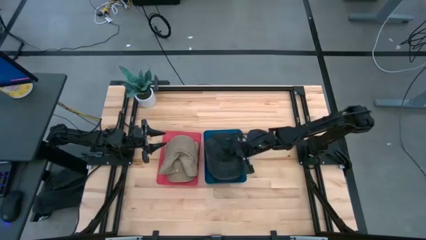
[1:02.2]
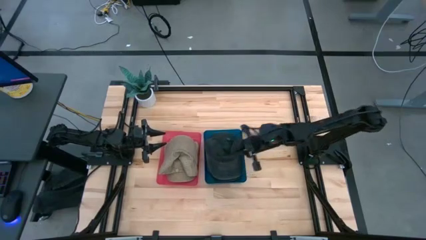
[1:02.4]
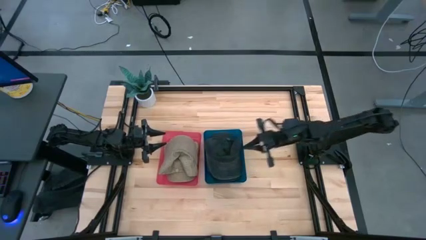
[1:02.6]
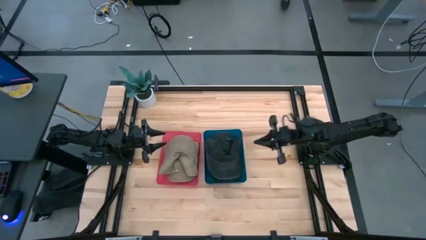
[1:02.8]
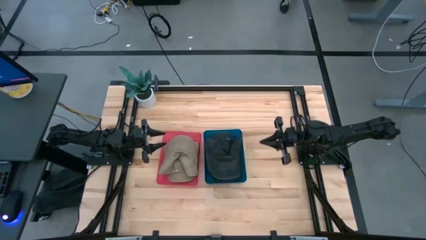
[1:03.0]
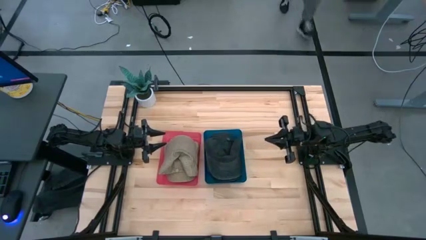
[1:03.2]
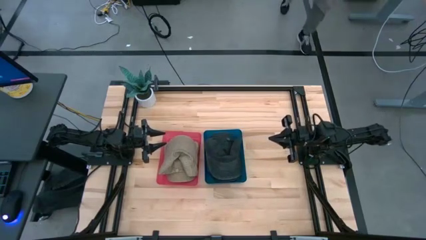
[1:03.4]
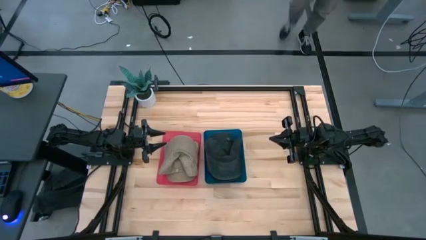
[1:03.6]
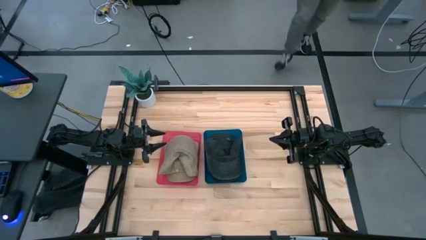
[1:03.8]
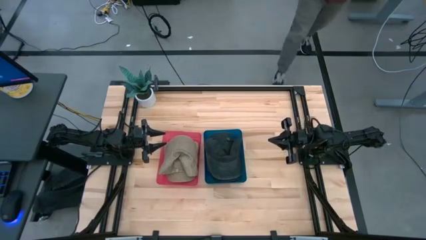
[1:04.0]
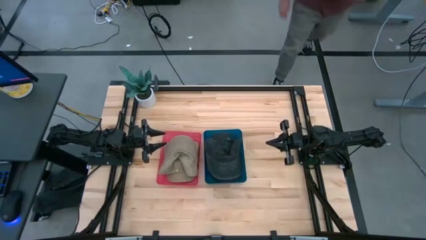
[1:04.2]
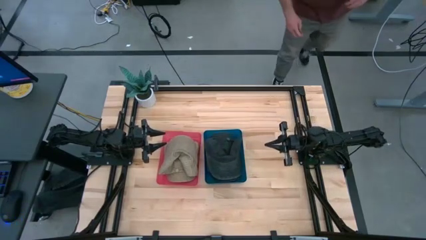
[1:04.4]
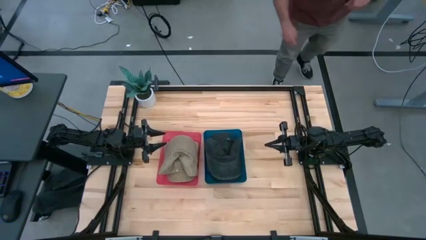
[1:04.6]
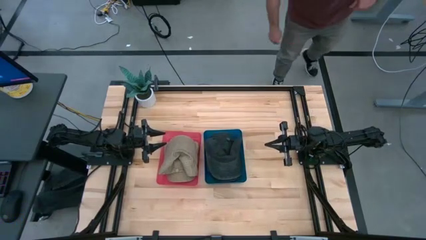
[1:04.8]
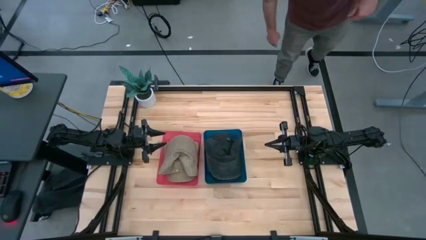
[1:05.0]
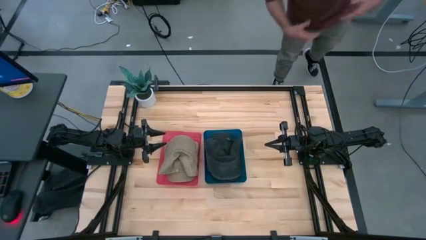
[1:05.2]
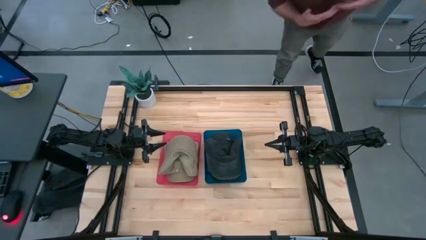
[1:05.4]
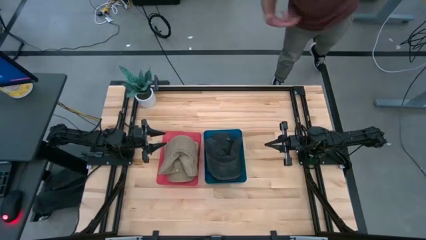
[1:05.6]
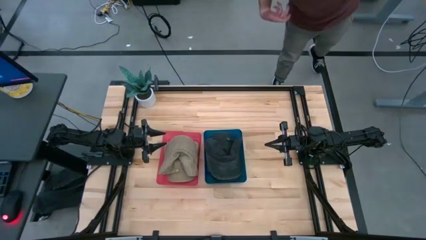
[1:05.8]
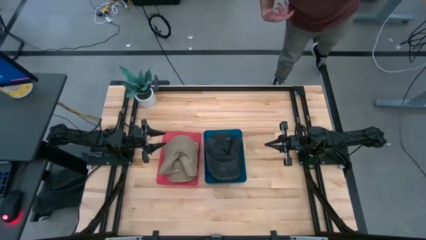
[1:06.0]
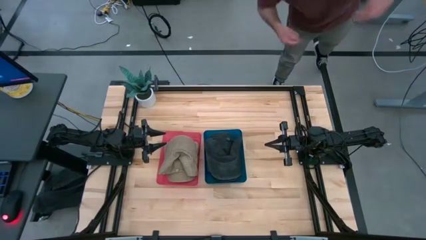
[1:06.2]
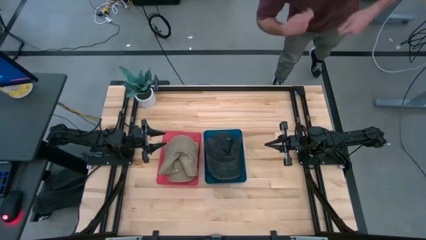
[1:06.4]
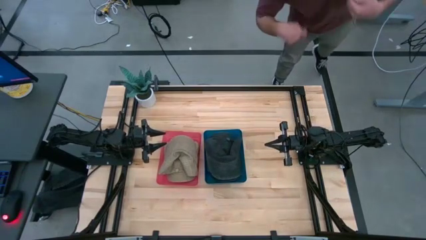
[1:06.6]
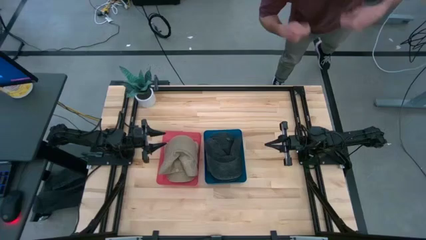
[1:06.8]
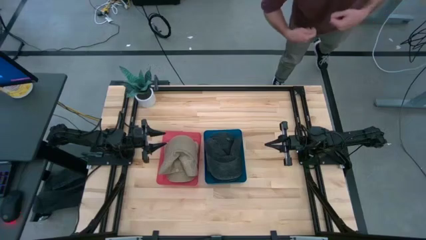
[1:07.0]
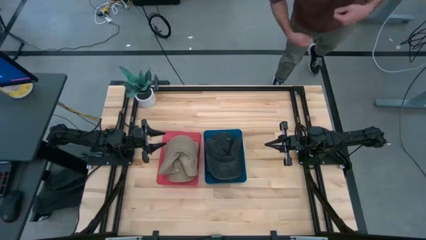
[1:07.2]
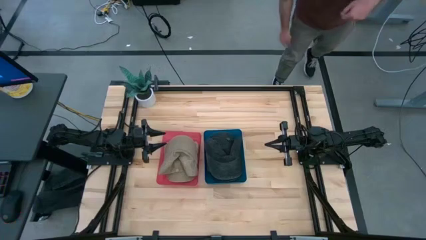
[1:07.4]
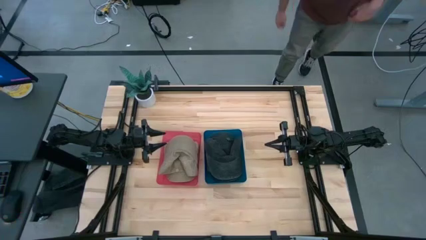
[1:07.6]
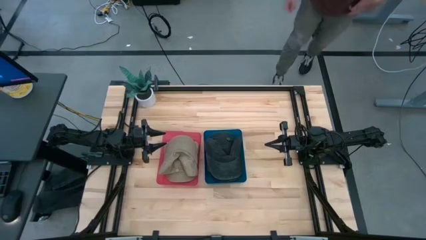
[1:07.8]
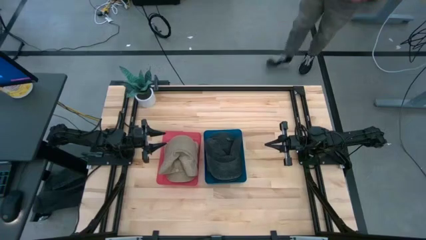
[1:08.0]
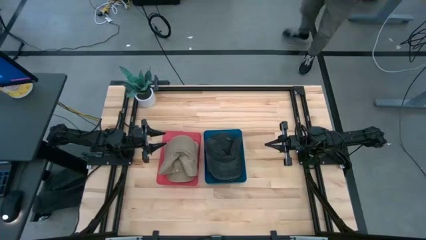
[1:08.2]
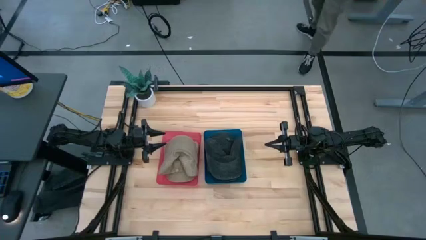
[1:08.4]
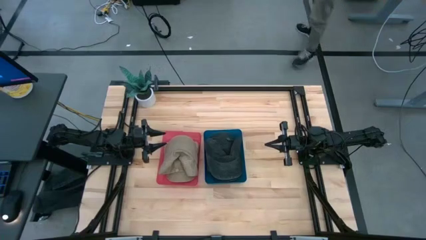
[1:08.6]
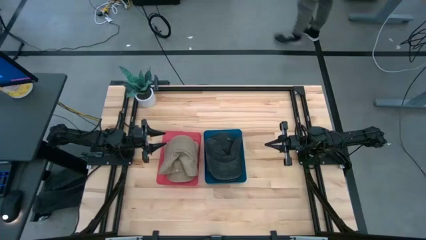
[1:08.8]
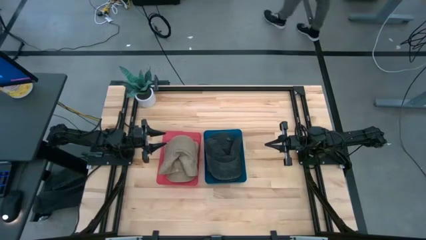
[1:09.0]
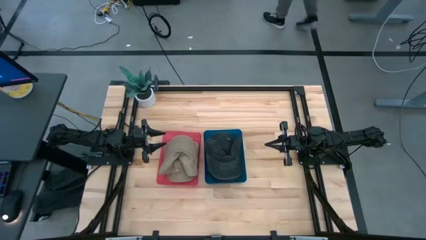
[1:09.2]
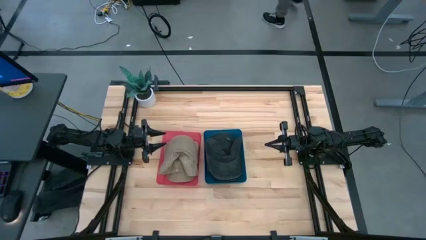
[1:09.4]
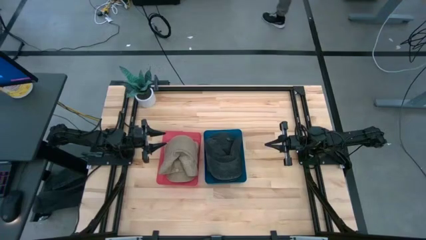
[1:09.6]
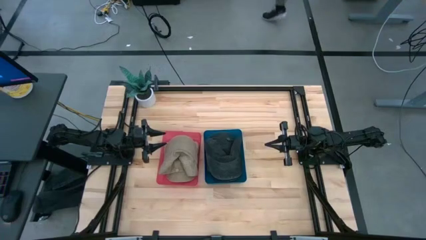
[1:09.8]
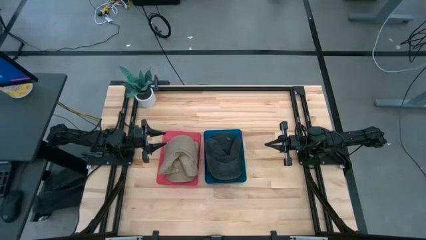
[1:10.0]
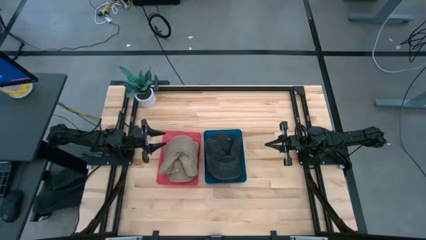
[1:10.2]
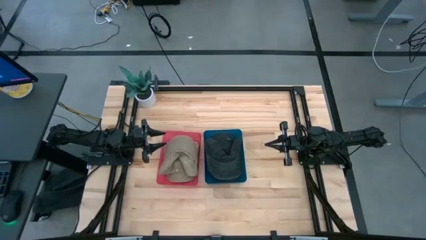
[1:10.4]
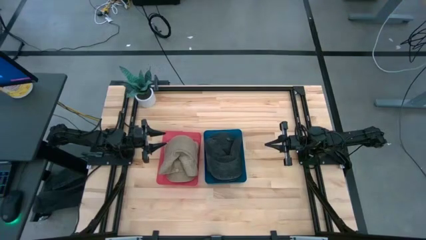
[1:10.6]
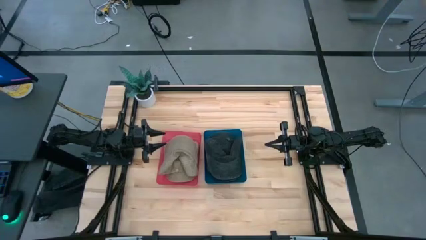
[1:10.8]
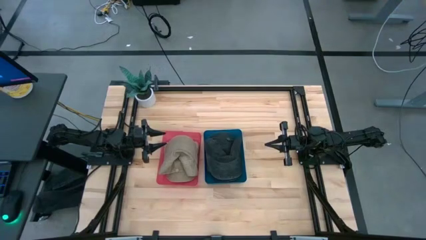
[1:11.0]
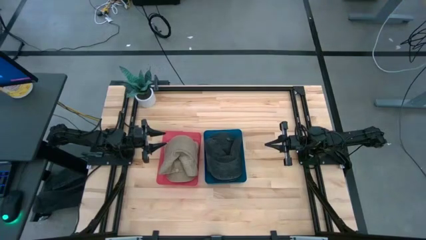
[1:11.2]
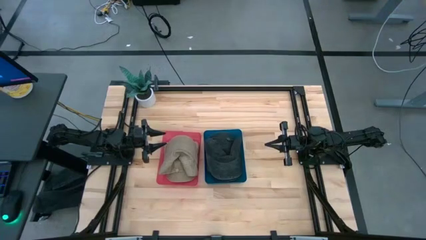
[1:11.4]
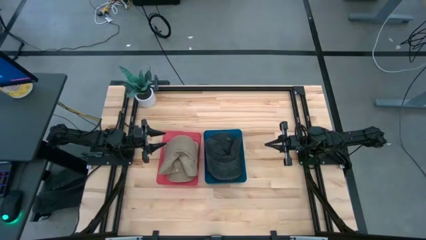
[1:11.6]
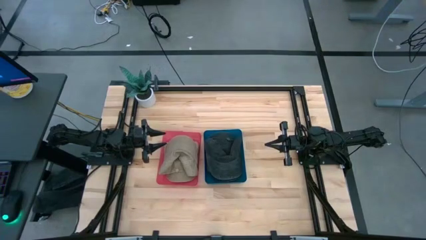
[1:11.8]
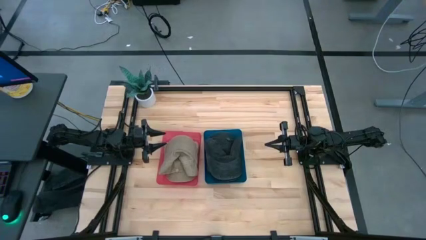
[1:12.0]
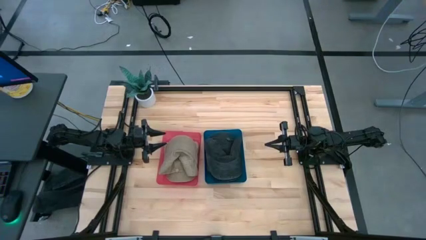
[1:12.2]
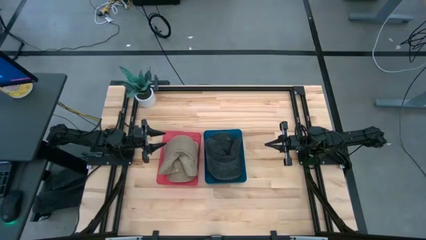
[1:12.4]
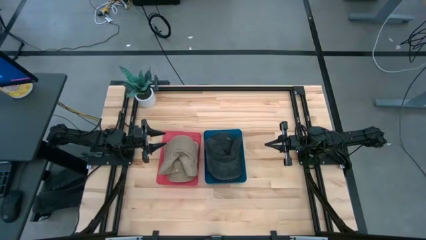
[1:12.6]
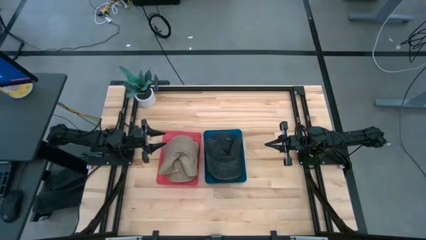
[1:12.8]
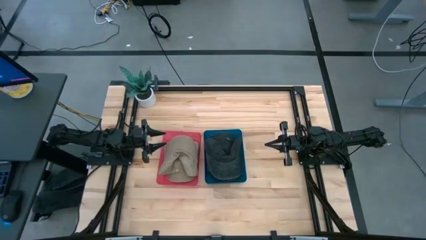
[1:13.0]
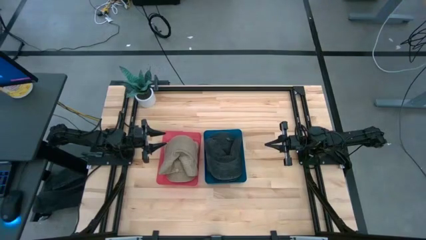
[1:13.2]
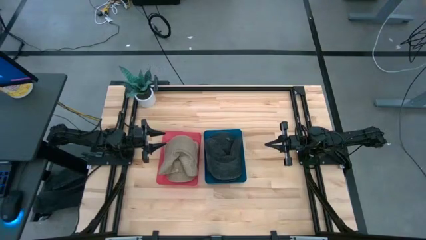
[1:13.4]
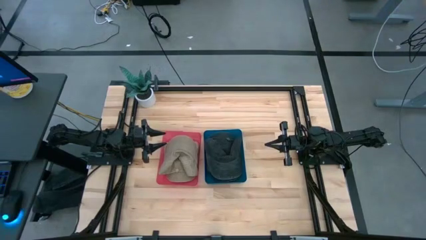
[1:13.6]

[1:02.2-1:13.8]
Task: Pick & Place hat
Return to Home Position

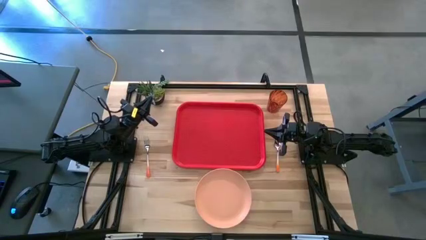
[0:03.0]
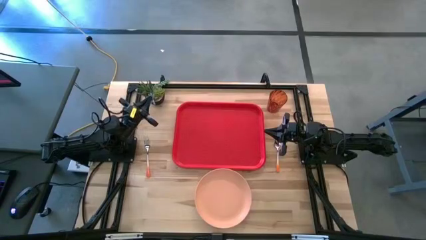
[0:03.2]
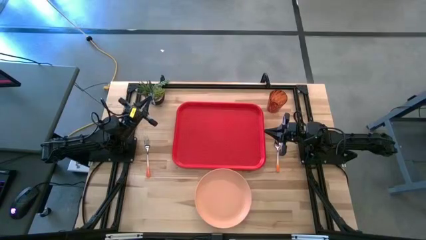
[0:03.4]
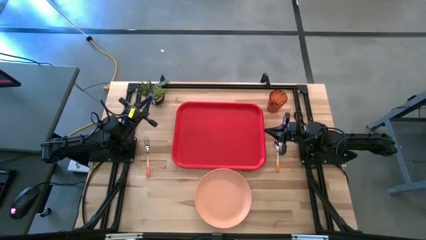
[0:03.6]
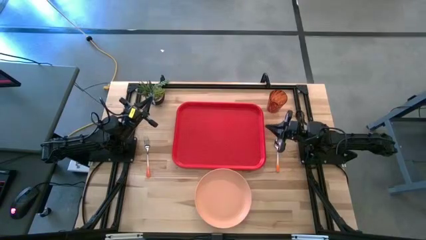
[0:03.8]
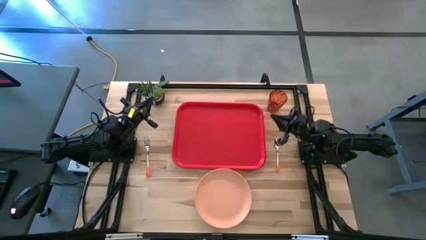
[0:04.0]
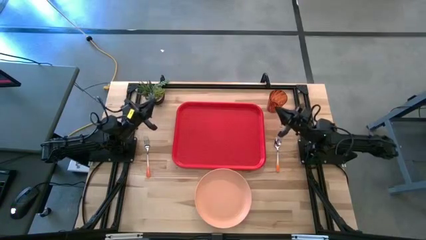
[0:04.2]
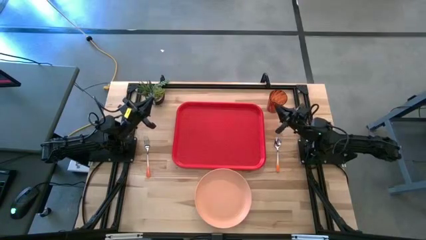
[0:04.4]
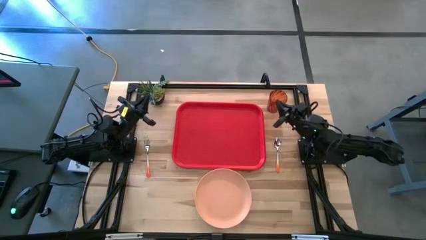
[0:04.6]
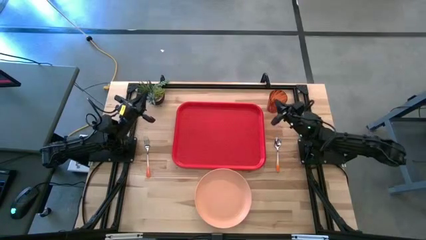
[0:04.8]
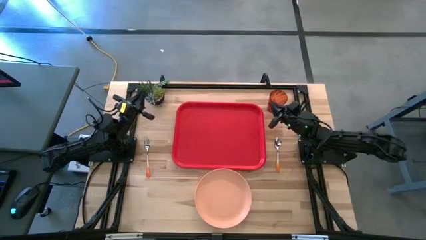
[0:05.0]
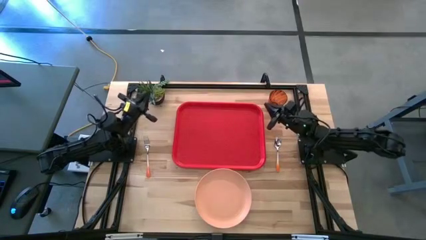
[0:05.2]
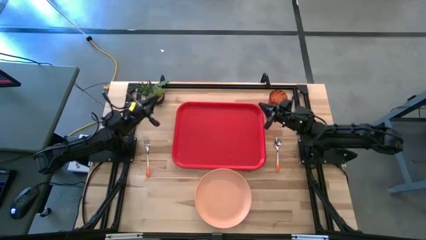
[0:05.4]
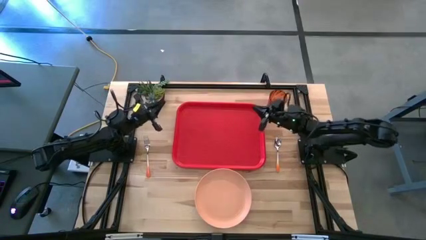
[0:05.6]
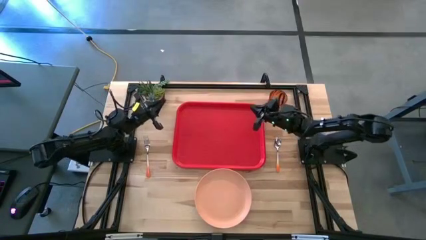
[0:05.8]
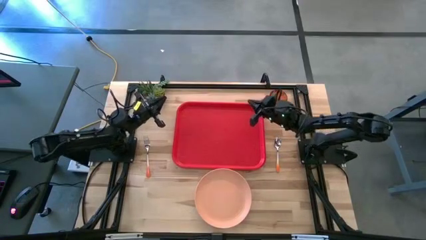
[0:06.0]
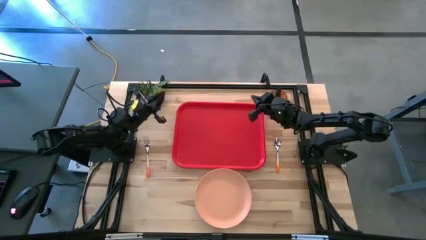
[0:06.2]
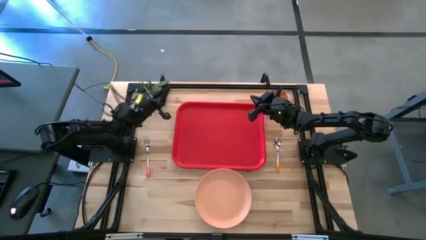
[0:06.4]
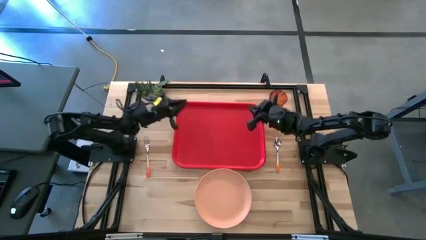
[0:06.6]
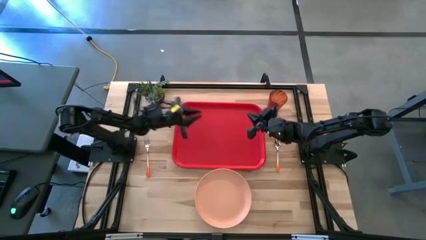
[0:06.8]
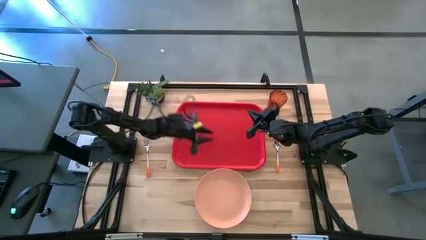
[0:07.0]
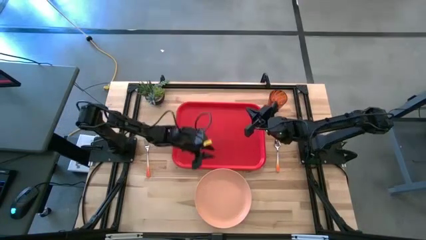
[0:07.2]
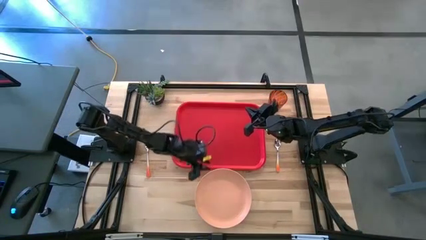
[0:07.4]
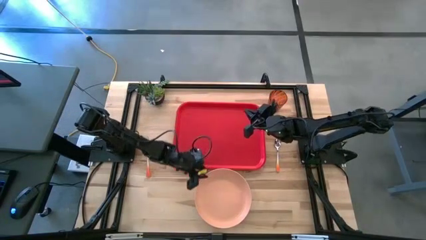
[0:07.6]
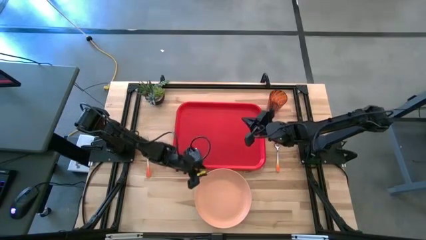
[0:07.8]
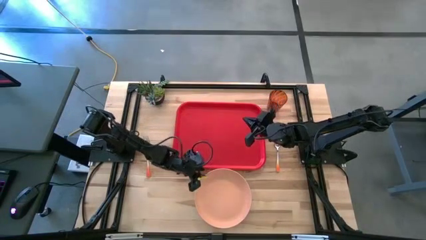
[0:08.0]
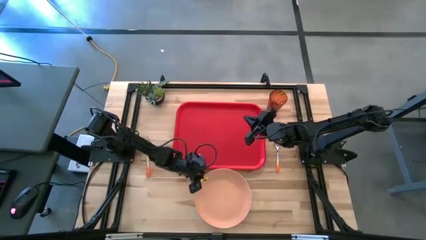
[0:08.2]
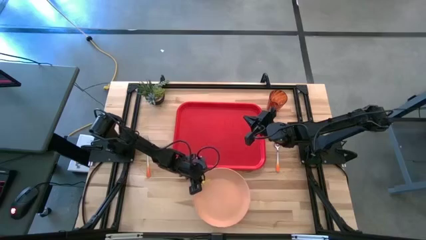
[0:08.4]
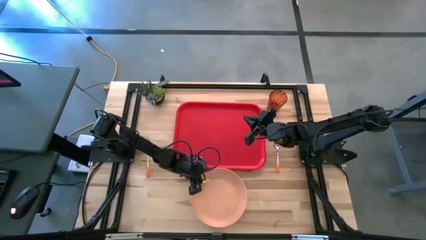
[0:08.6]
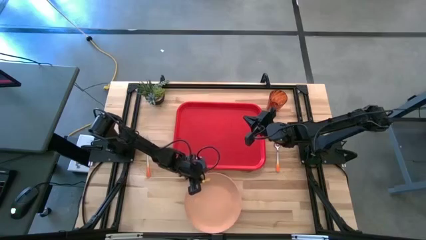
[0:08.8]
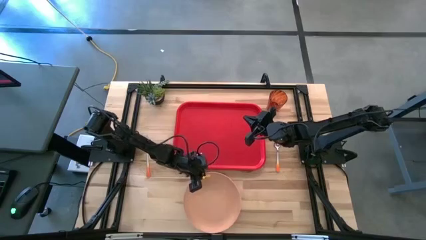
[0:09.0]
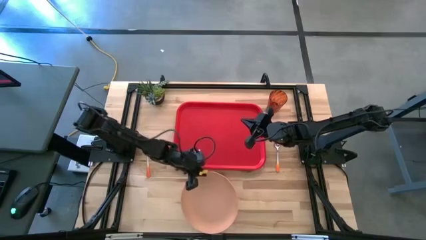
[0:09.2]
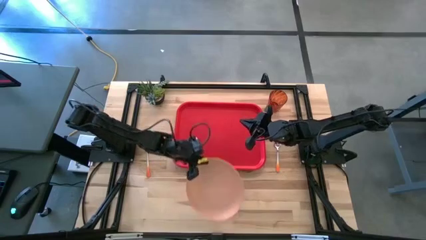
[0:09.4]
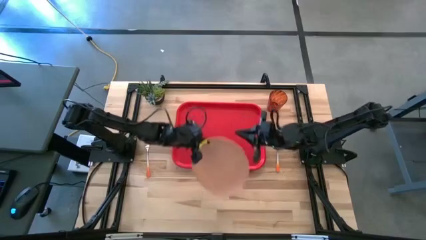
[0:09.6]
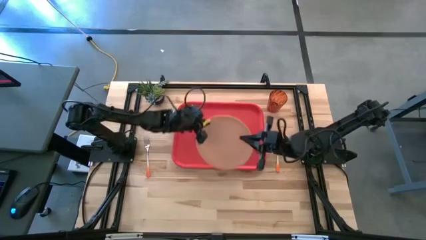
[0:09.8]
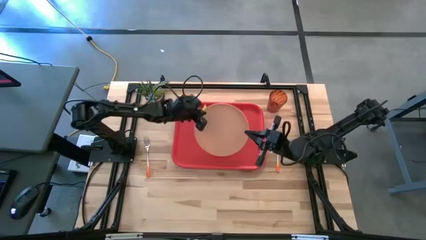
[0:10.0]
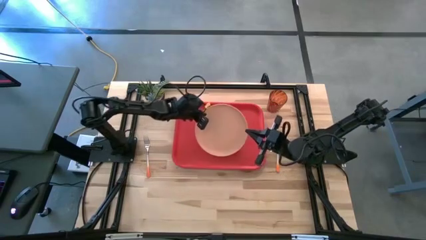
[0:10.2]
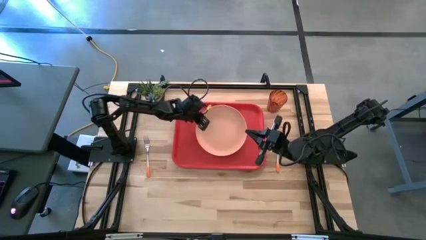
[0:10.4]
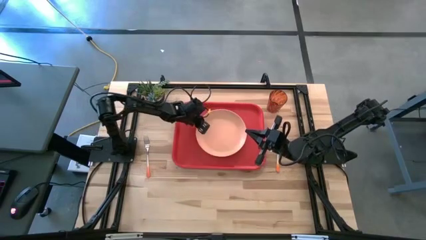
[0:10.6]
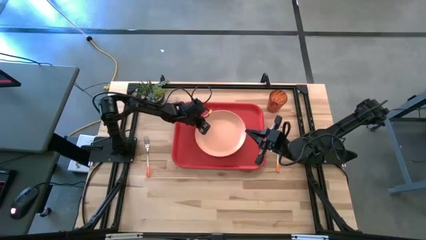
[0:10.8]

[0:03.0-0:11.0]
Task: Pick and place plate/cup/fork/spoon on tray
Put the light orange plate on the red serving tray
